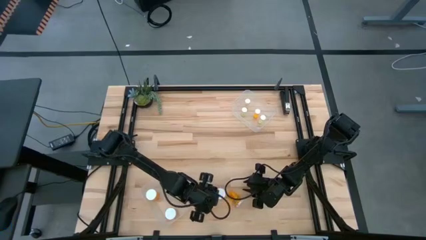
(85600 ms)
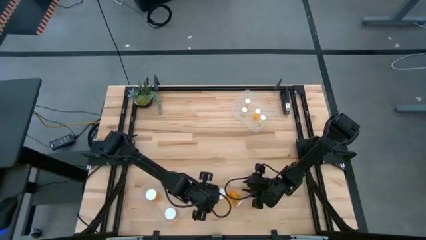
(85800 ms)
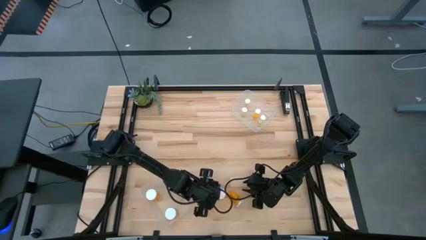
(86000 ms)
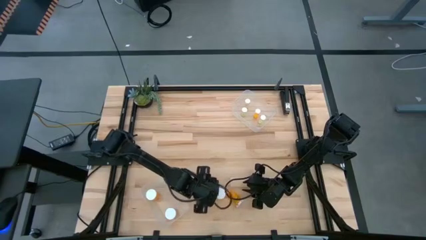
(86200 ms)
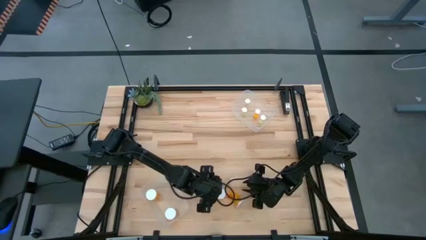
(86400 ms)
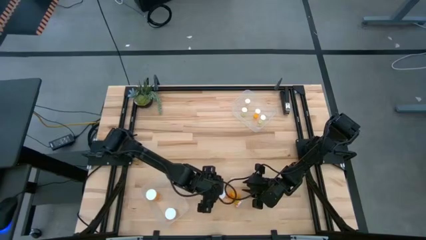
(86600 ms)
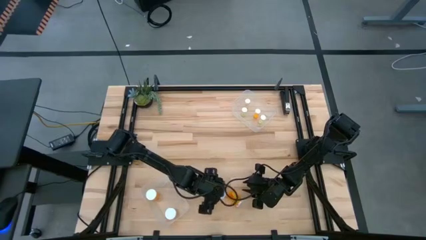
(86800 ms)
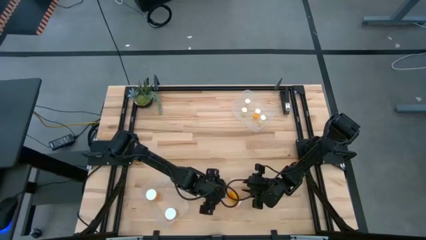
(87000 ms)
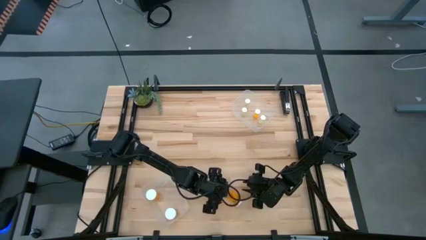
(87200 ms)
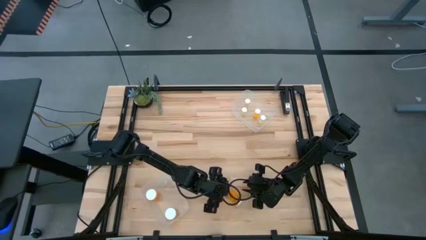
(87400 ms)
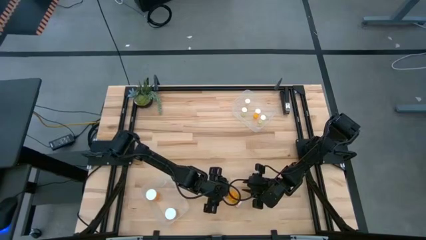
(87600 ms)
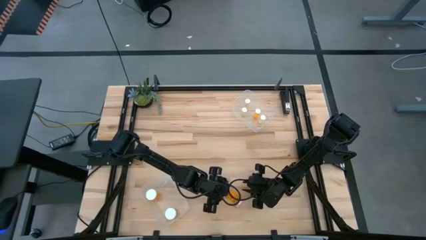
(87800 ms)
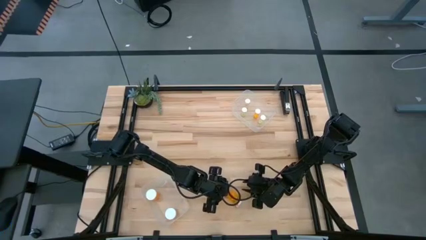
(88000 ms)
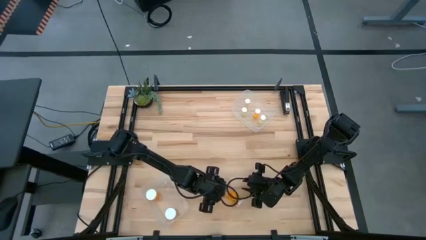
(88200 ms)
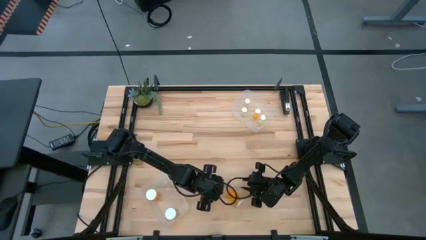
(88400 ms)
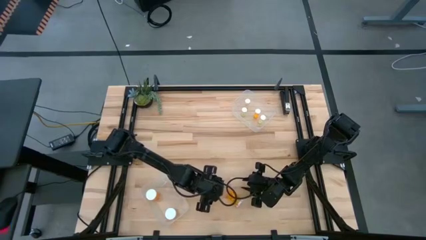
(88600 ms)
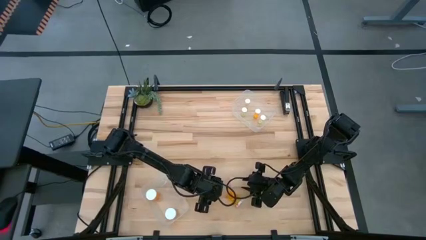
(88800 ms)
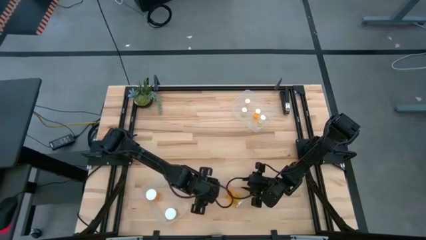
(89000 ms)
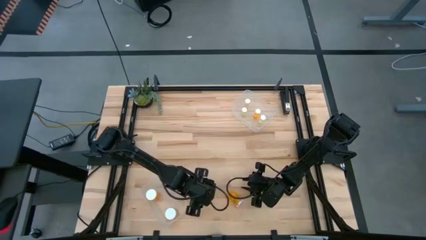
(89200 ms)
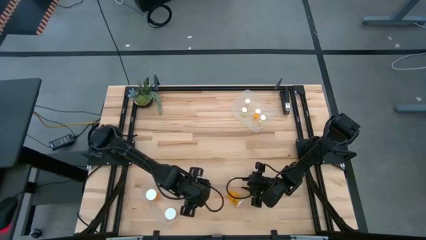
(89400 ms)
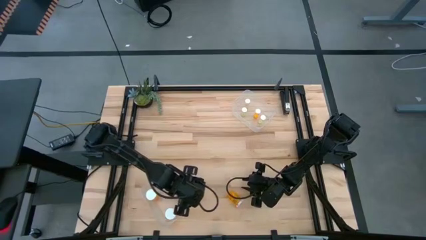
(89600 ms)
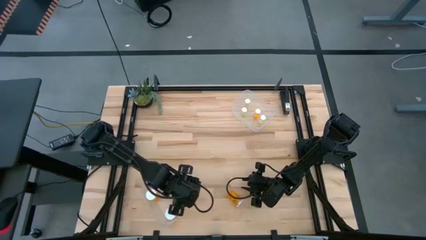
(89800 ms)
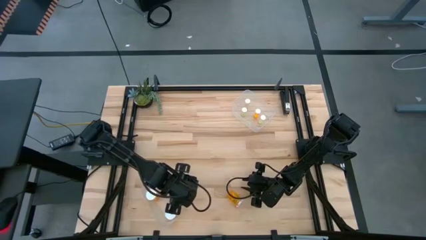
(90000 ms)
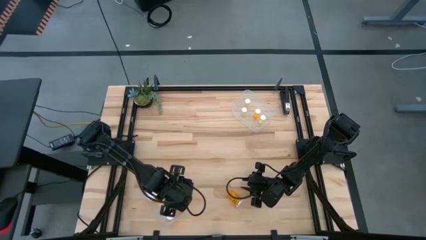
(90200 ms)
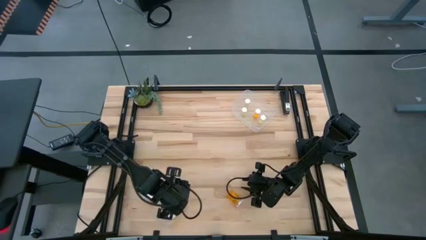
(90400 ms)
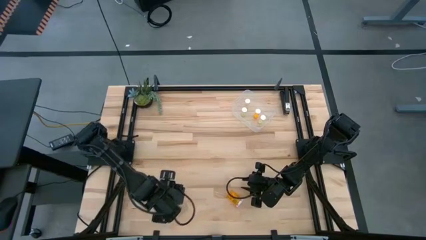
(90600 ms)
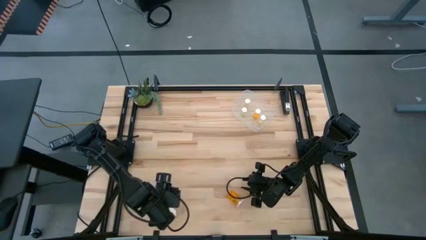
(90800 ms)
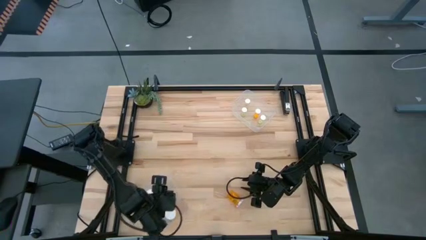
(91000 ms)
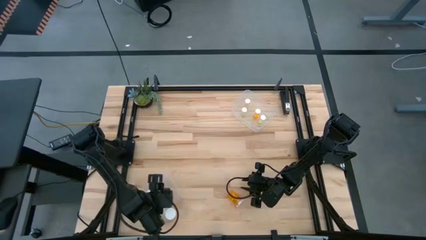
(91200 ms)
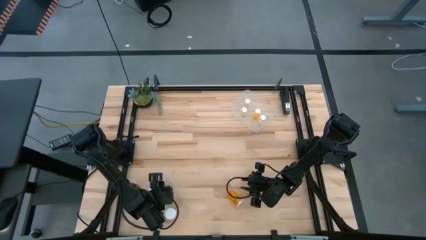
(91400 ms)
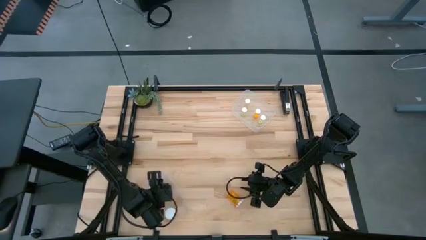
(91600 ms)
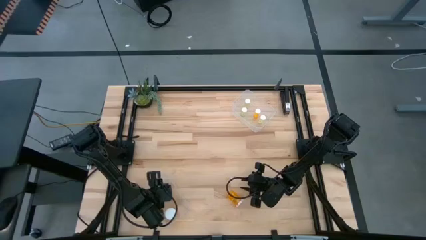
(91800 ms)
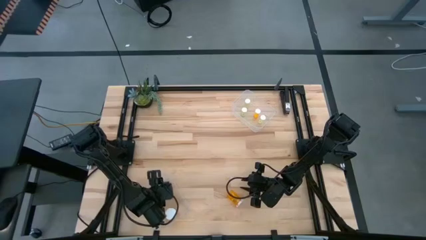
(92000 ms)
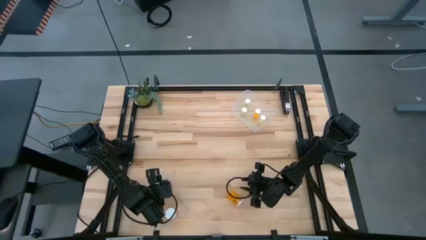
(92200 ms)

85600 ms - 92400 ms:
Task: Pick and place medicine bottles into bin by pill shape (circle, oval)
Put the big orange pill bottle into the bottom transparent bin

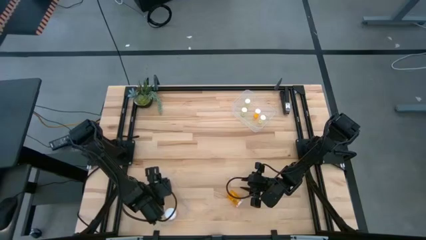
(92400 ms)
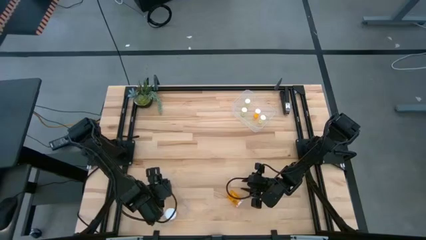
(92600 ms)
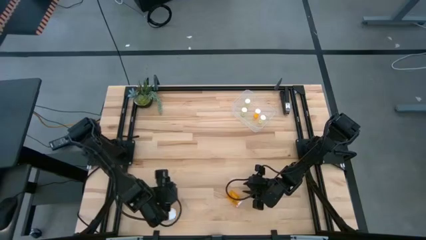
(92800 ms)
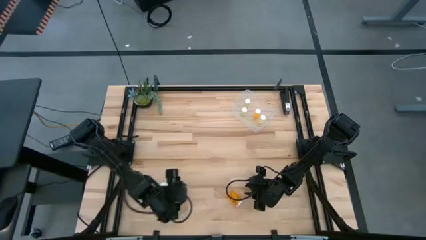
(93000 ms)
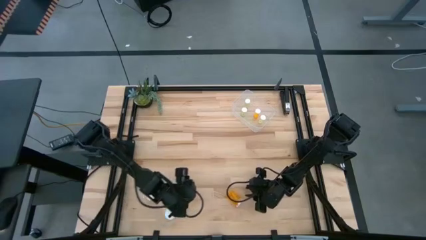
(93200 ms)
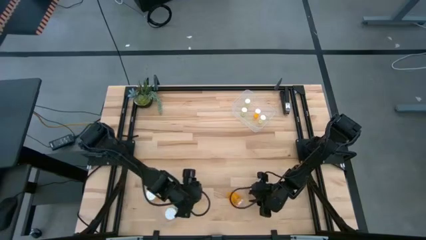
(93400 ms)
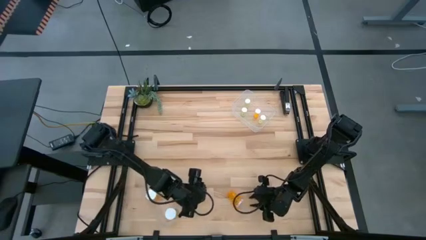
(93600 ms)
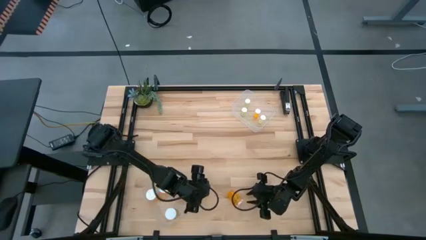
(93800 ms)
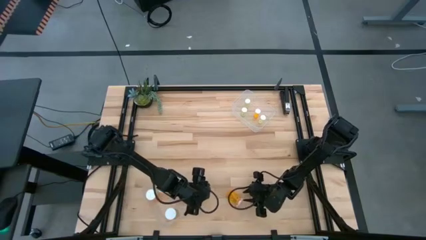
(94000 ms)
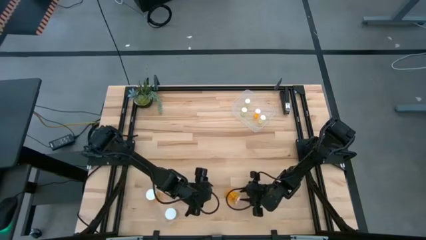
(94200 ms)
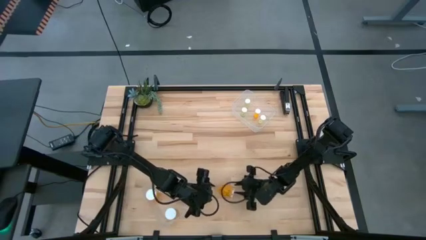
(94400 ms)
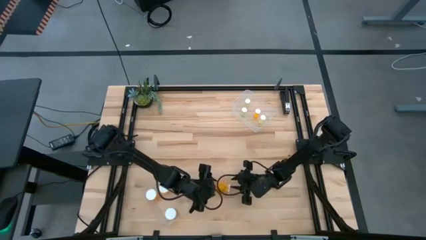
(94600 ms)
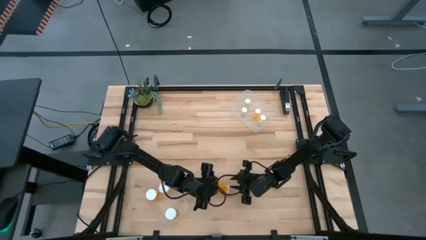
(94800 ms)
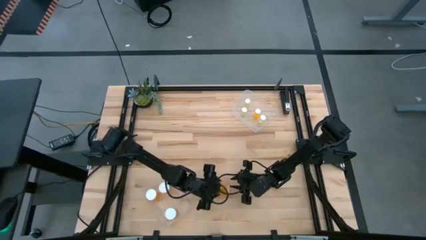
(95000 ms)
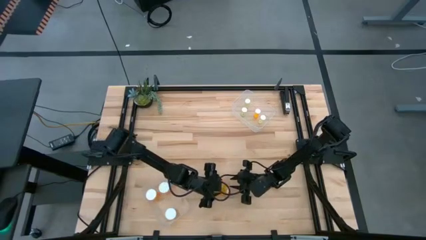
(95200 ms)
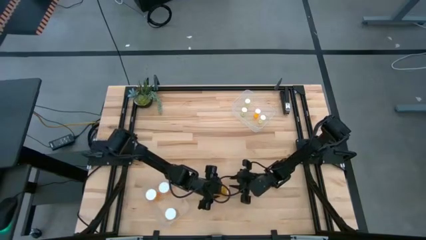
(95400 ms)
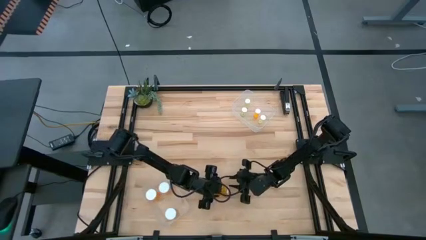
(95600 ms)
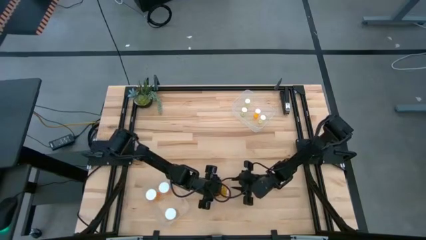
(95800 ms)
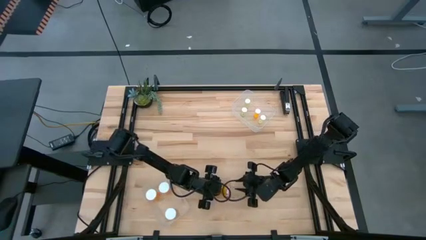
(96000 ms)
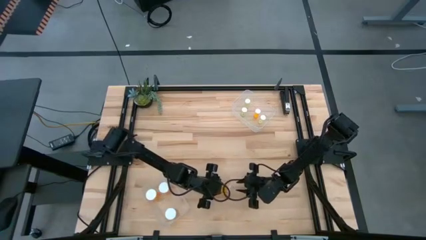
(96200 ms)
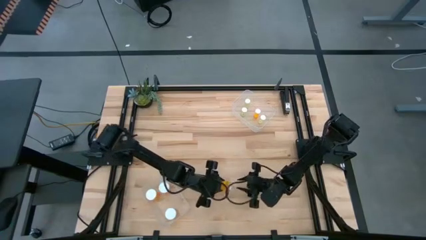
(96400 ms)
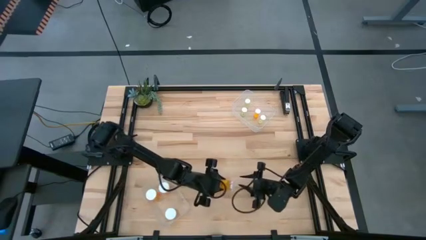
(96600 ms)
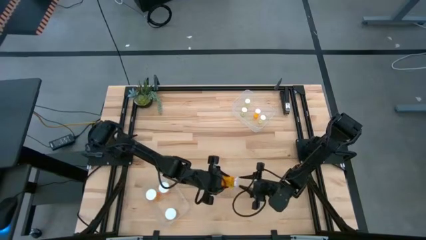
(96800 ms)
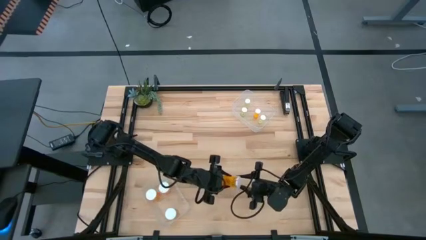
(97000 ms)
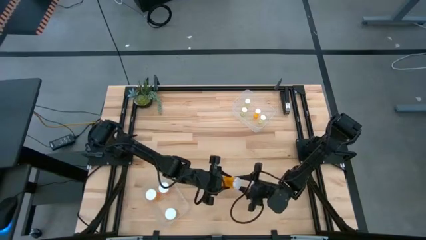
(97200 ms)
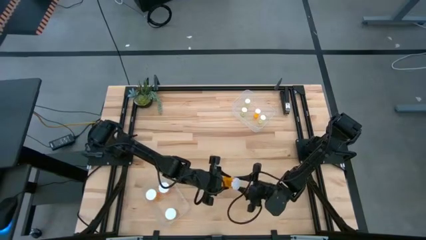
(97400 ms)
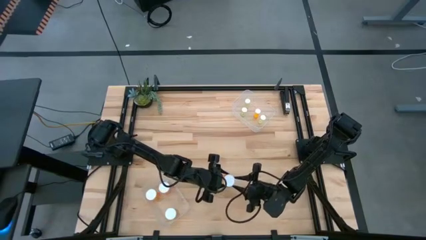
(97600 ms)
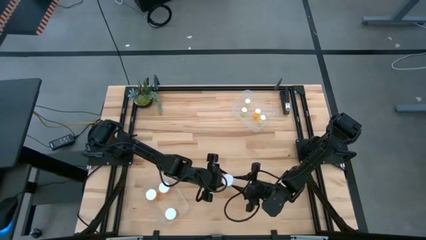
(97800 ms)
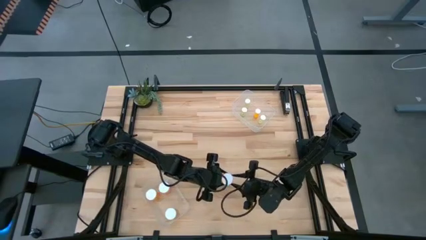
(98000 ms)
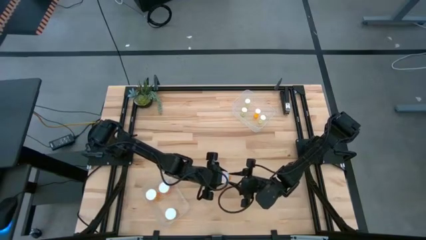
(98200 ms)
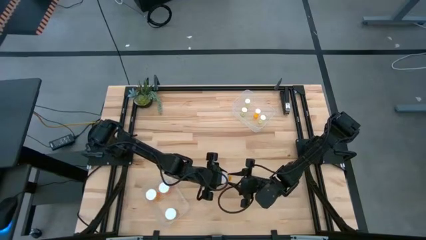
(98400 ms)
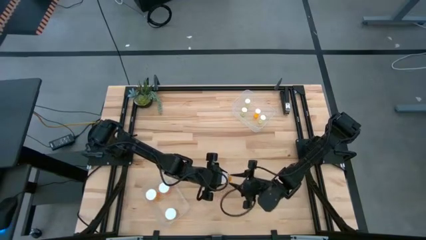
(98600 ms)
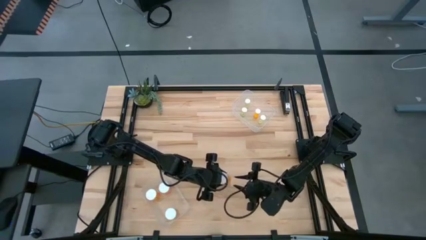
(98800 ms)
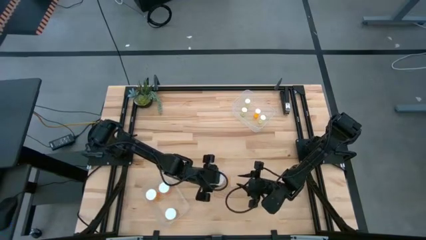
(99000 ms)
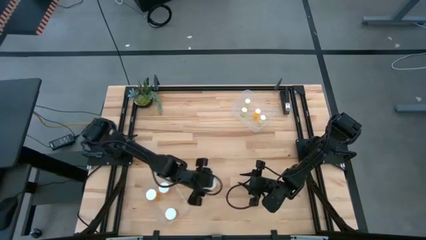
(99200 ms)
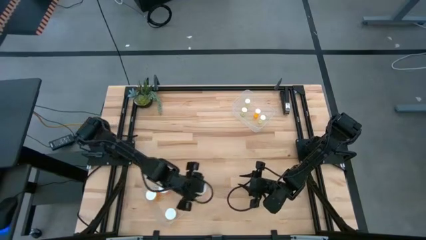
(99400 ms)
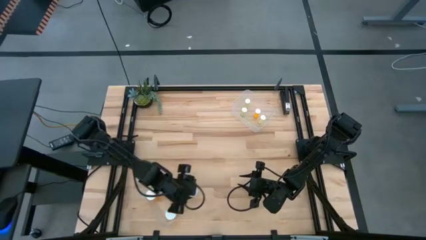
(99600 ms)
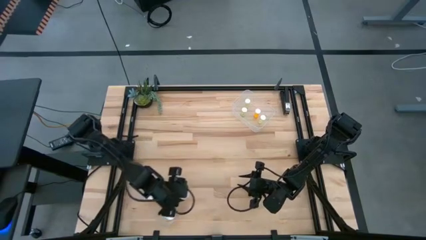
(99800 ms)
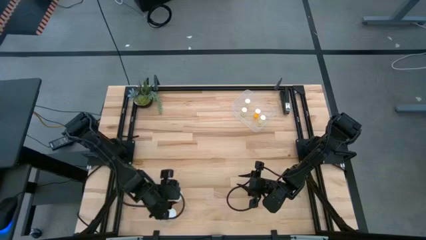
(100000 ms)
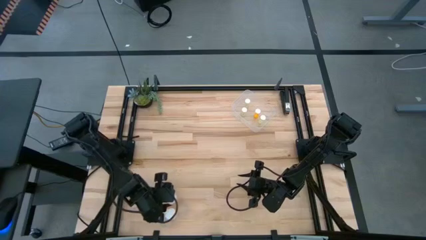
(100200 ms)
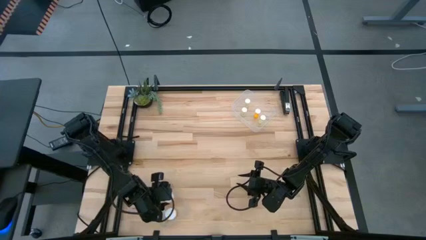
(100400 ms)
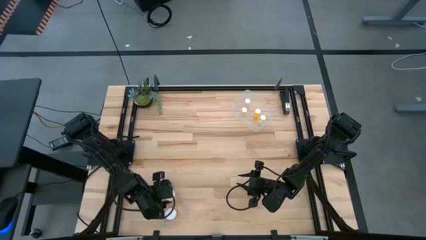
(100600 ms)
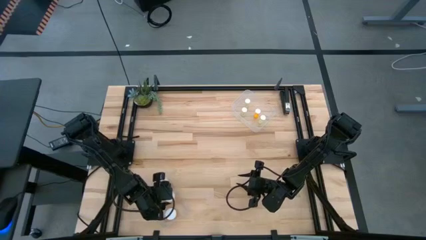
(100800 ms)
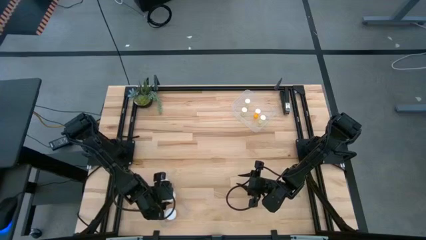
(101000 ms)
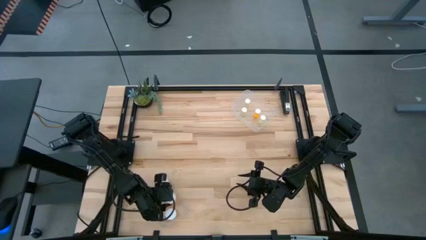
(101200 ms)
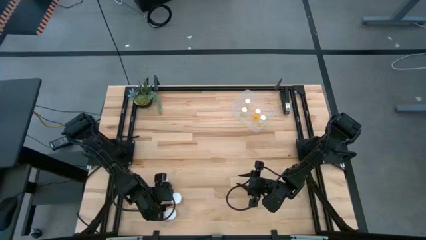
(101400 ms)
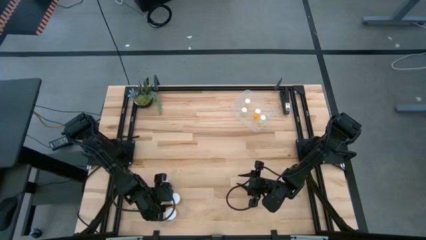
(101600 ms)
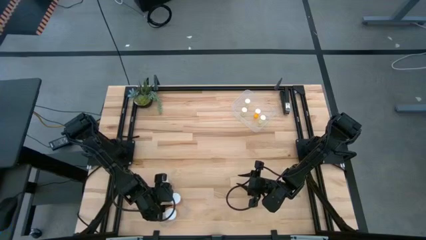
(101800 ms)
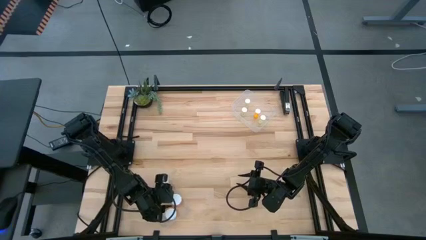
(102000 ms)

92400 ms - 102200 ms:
Put the big orange pill bottle into the bottom transparent bin
